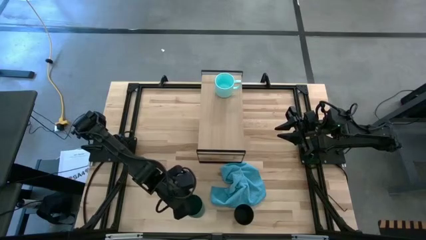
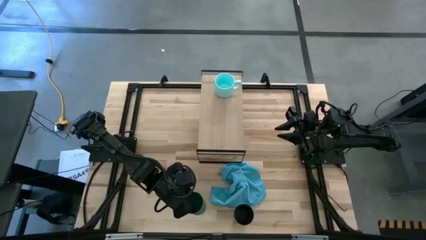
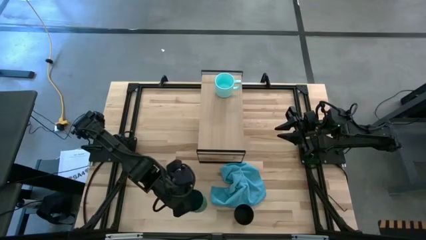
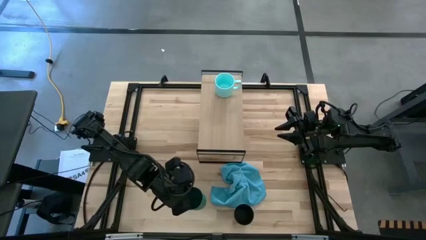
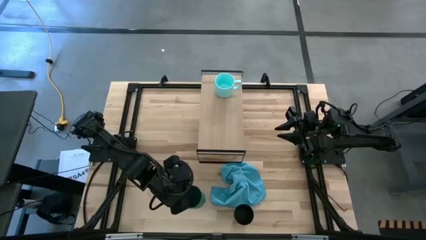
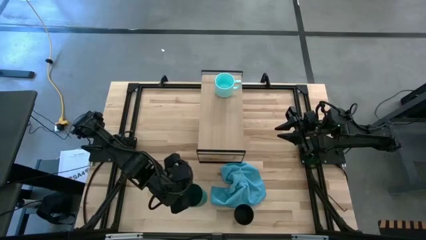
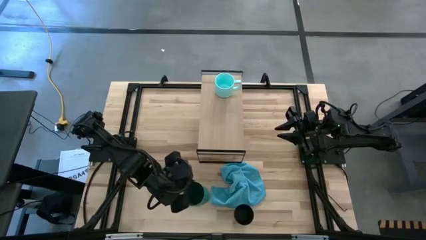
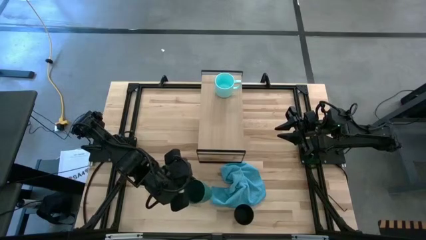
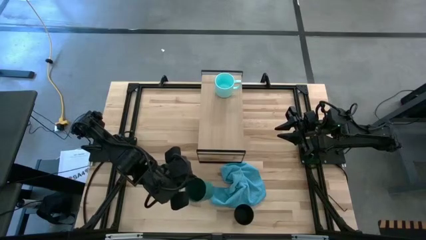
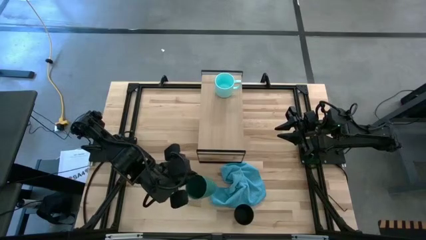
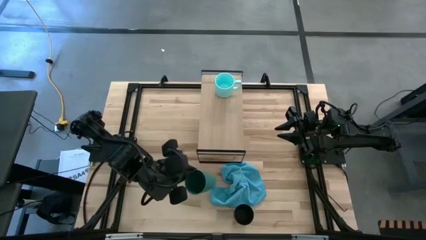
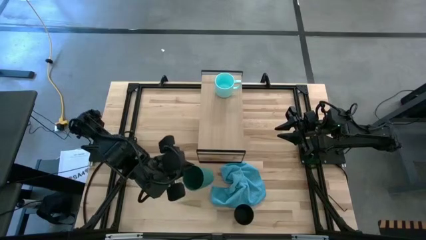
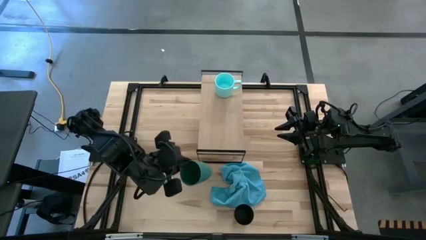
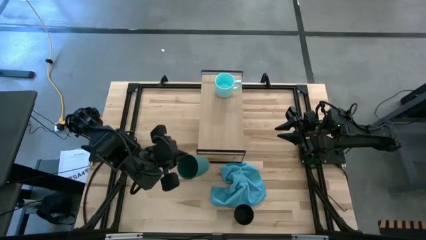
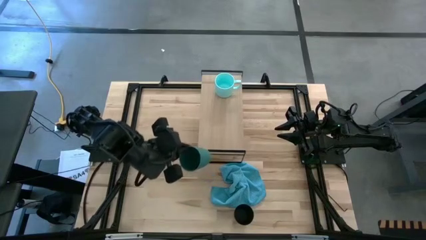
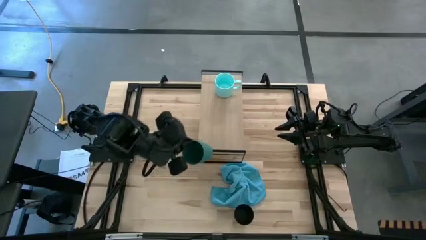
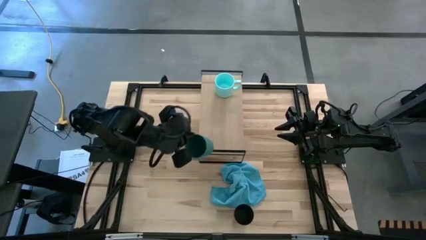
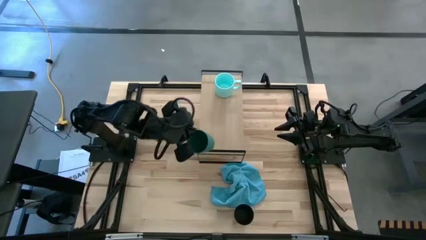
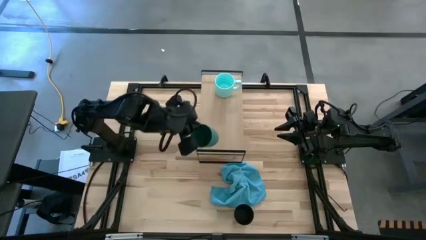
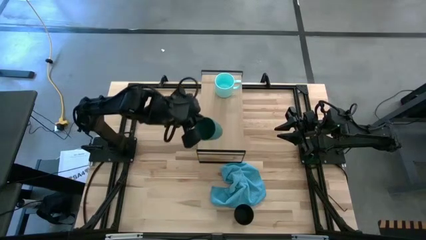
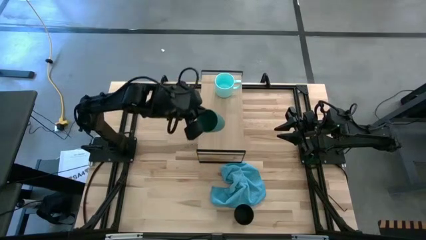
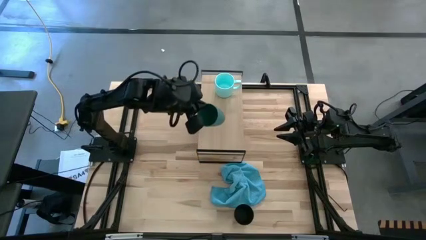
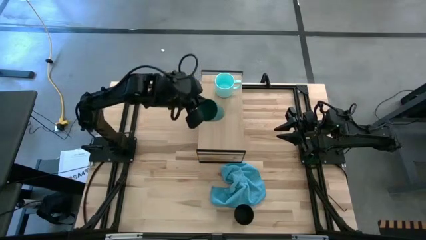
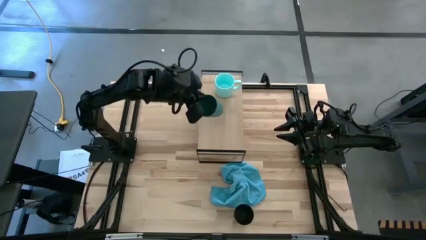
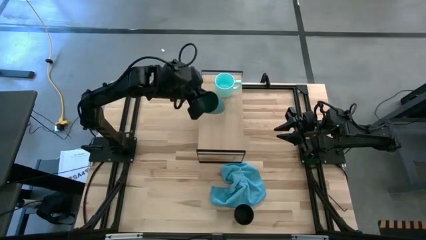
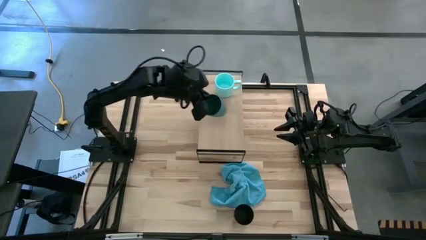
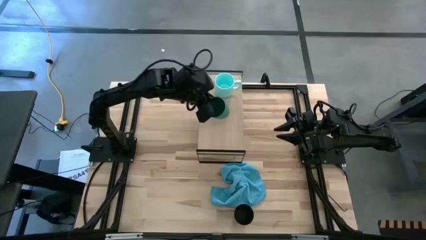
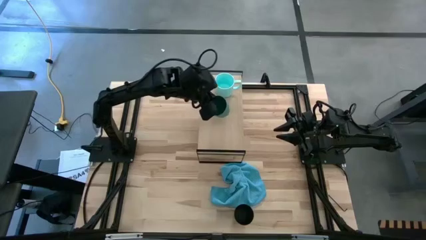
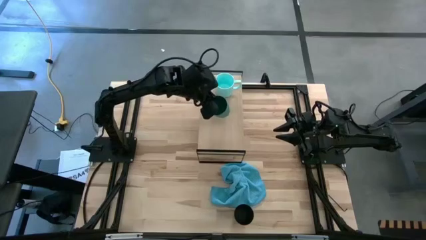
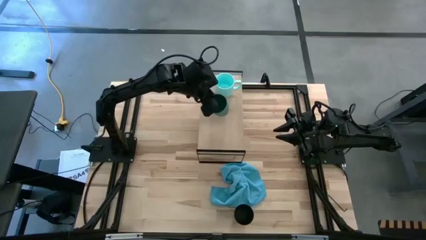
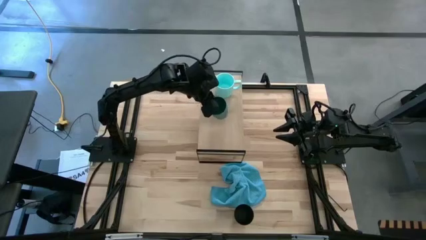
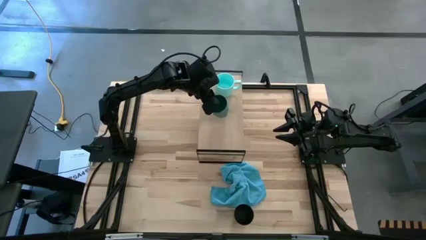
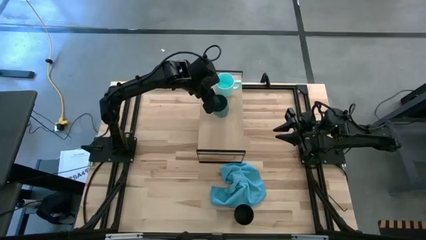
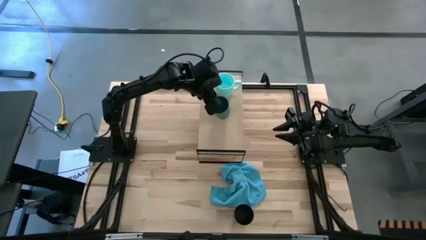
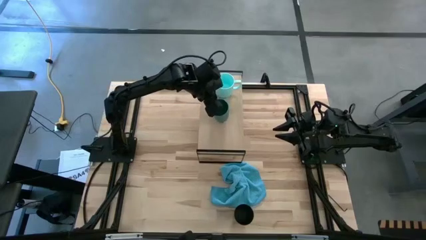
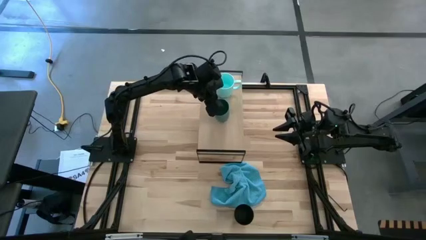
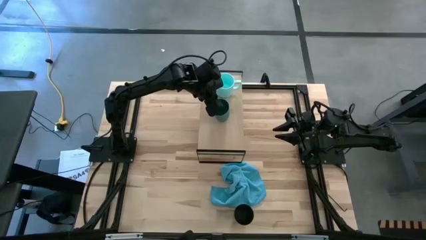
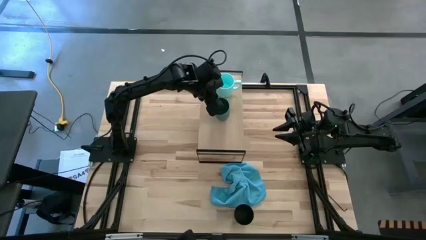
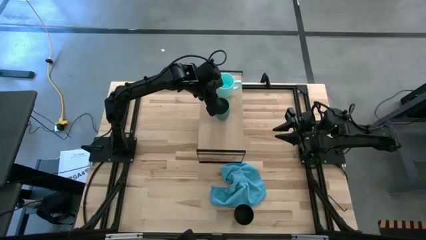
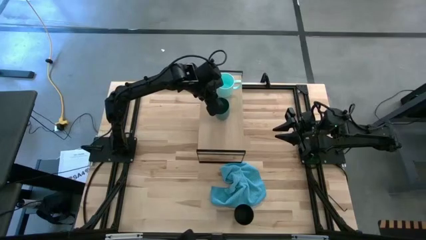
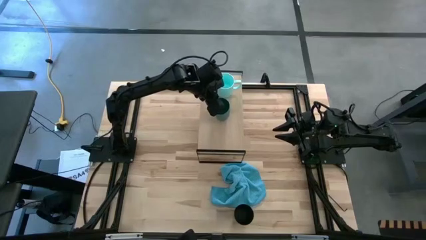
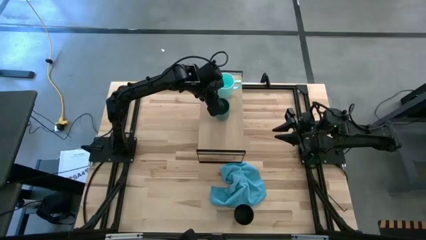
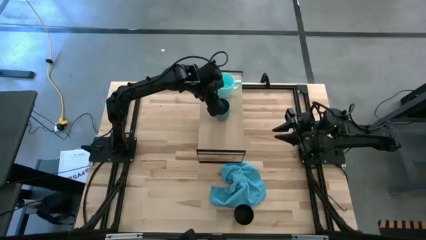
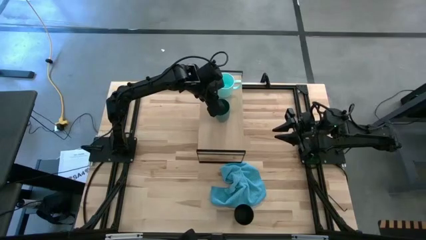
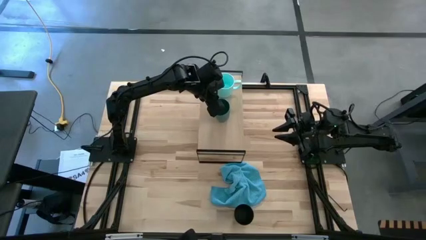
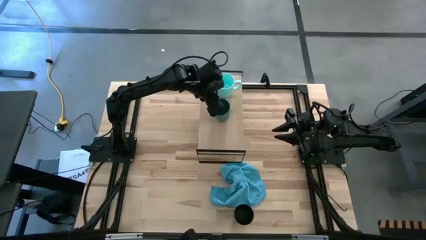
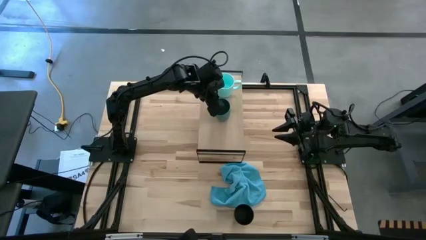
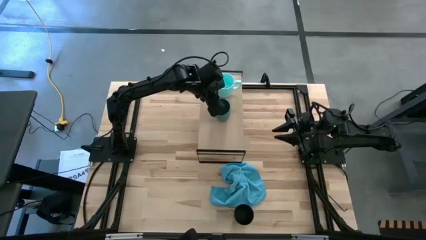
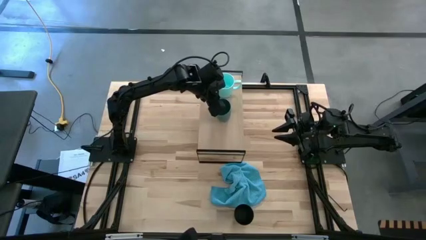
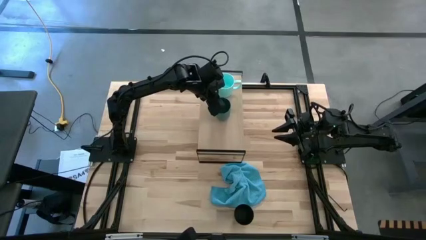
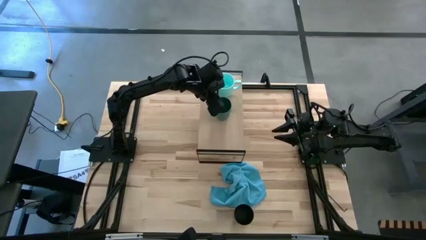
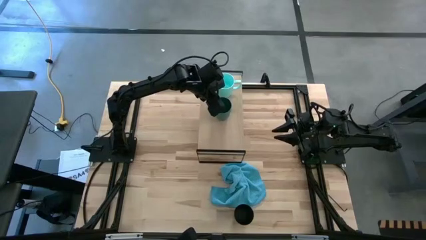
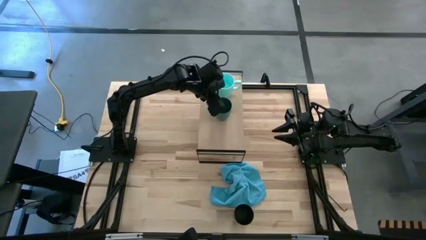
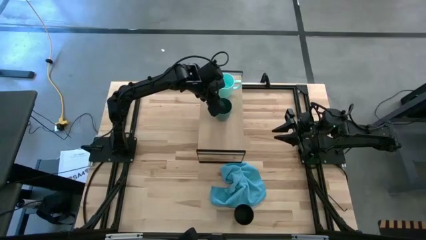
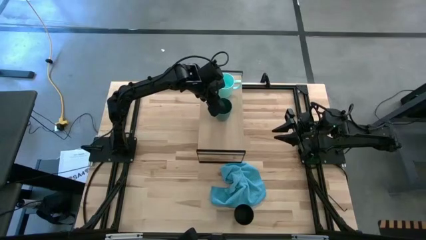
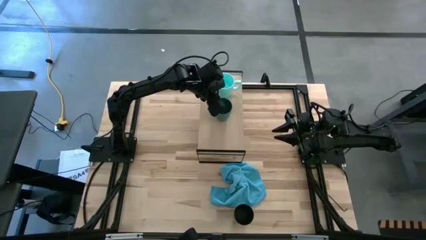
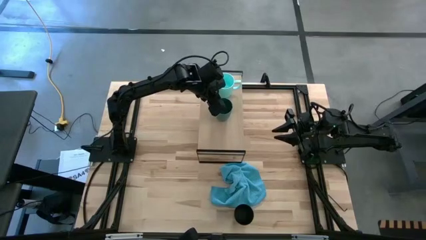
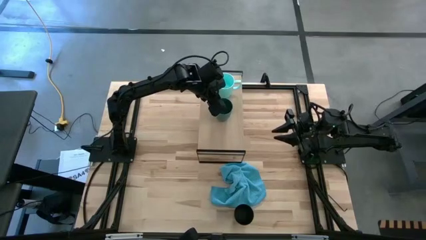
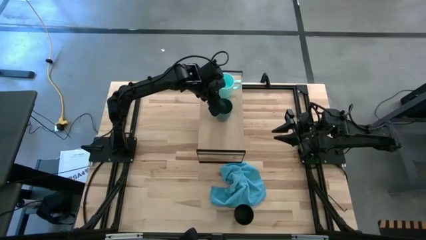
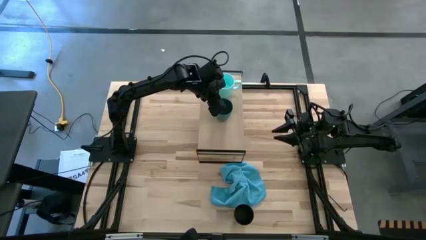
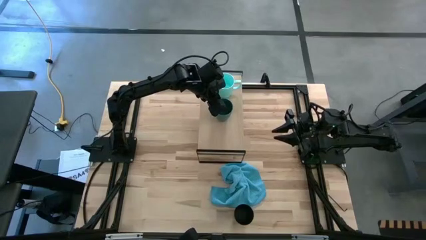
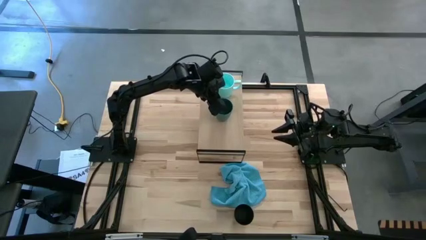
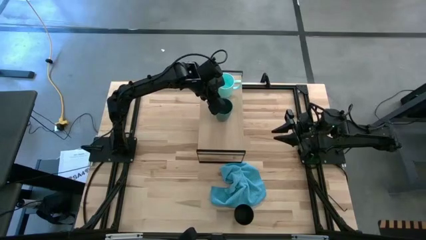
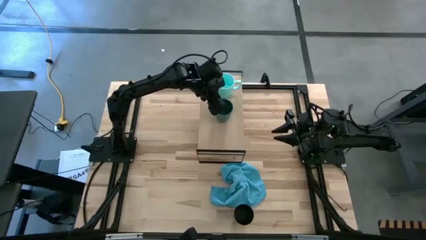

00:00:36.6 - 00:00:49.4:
Task: Stack small to large cups/mugs on shelf
Put the green cup on the shelf
